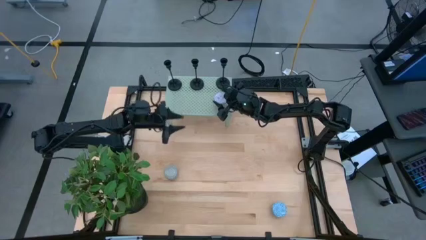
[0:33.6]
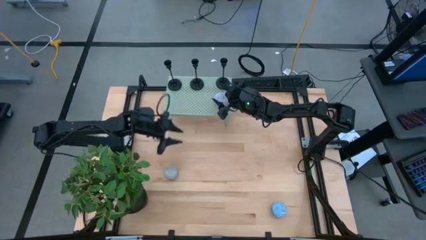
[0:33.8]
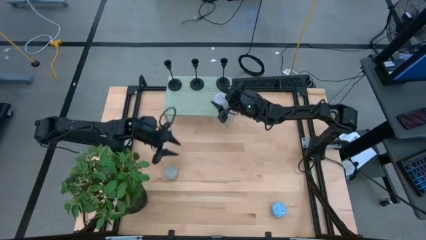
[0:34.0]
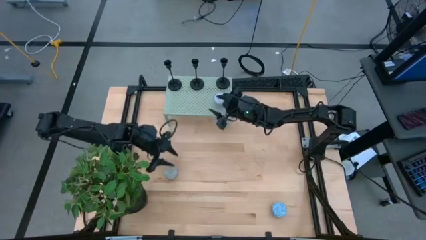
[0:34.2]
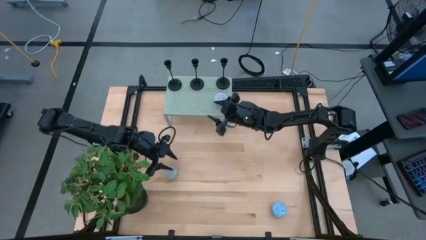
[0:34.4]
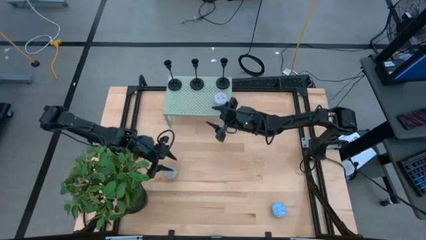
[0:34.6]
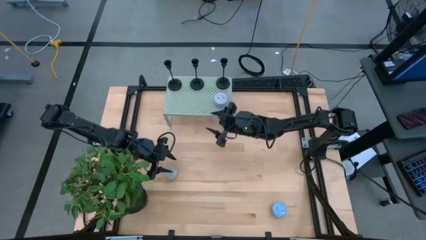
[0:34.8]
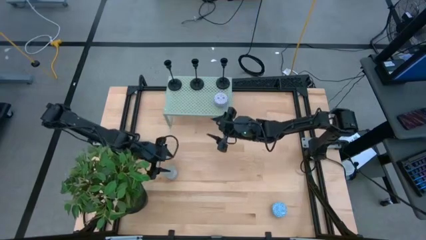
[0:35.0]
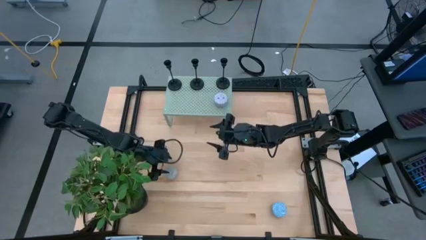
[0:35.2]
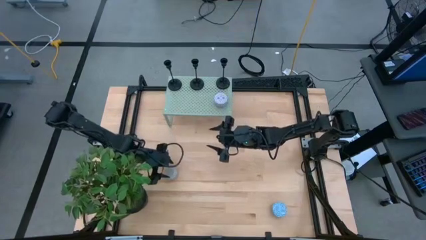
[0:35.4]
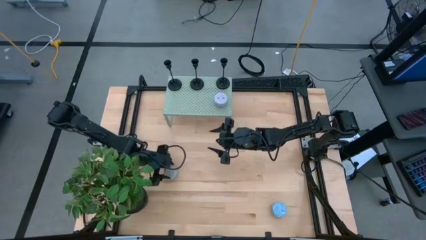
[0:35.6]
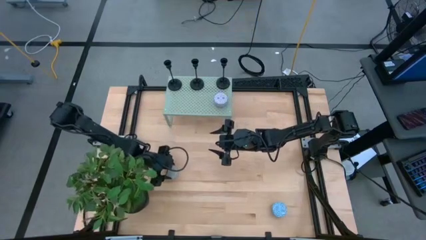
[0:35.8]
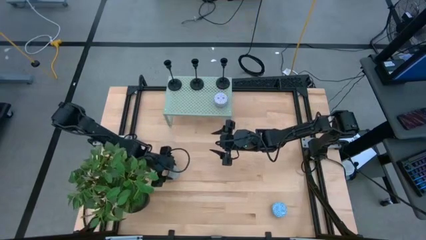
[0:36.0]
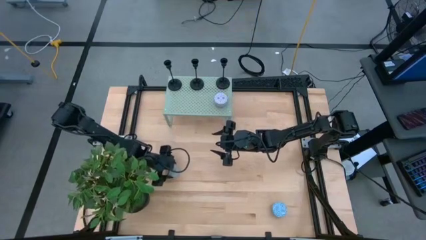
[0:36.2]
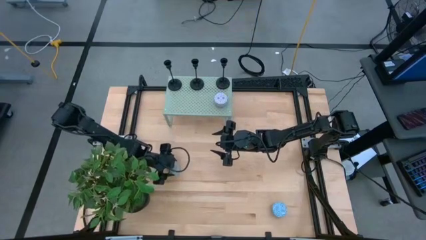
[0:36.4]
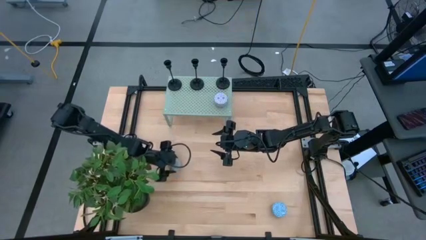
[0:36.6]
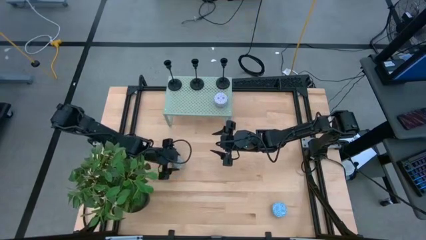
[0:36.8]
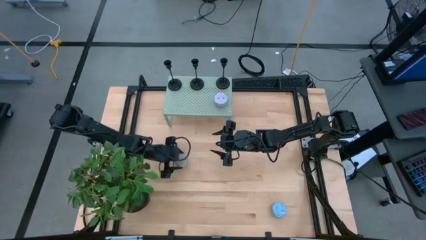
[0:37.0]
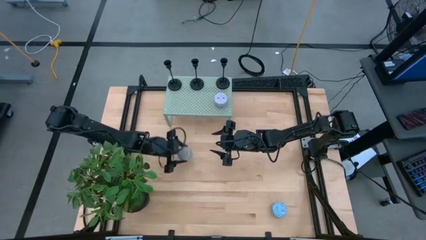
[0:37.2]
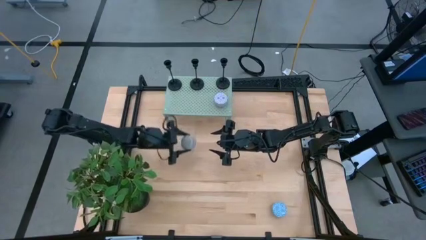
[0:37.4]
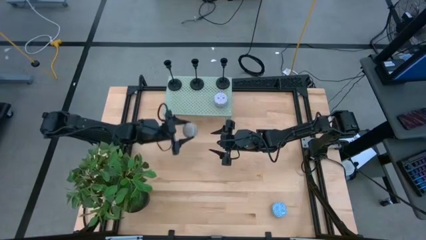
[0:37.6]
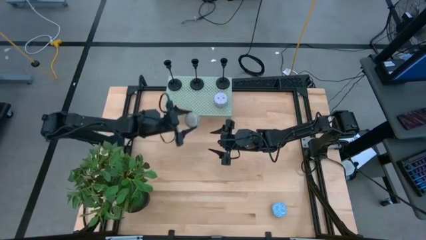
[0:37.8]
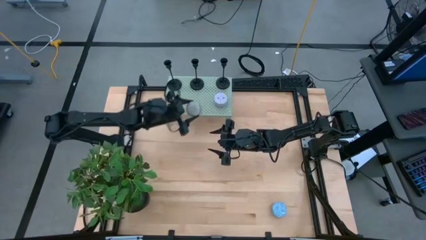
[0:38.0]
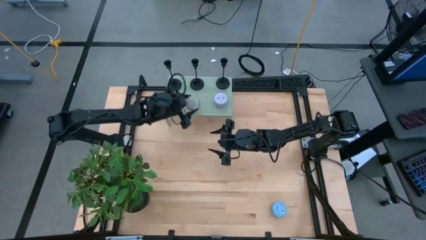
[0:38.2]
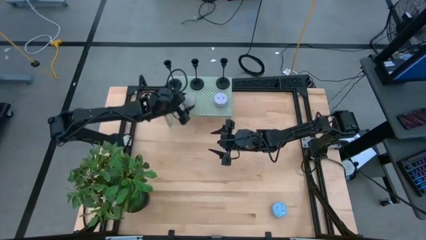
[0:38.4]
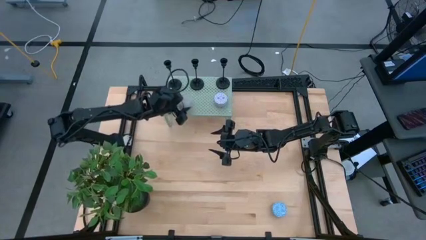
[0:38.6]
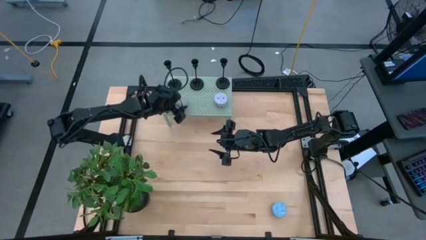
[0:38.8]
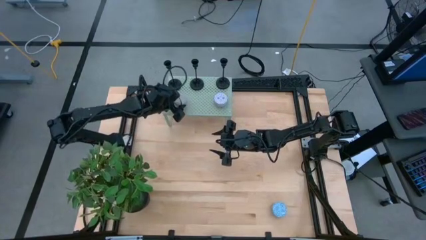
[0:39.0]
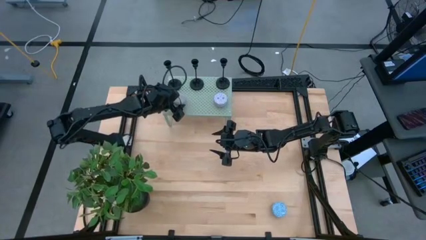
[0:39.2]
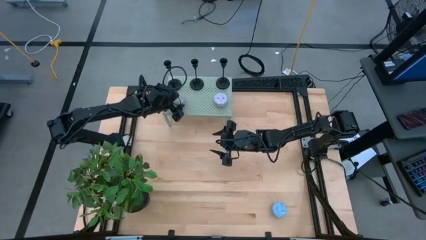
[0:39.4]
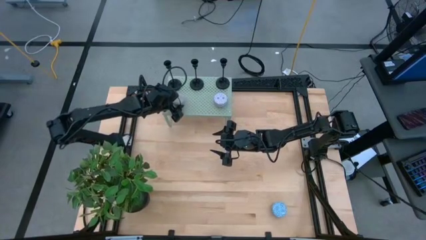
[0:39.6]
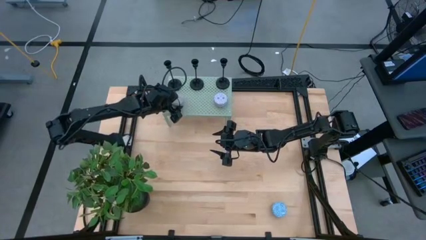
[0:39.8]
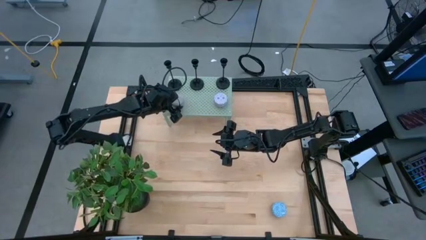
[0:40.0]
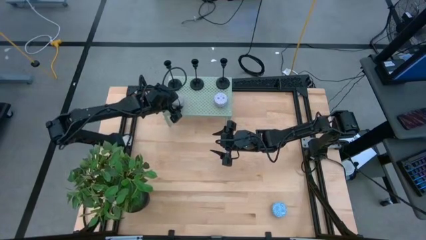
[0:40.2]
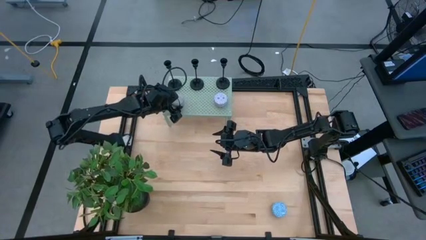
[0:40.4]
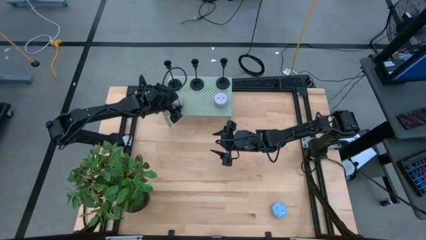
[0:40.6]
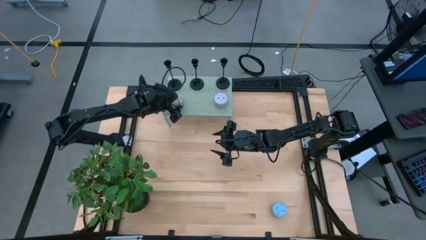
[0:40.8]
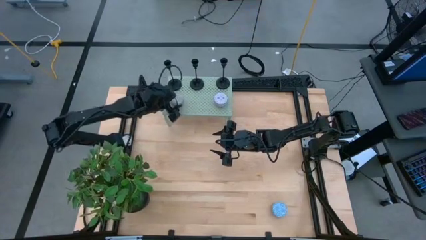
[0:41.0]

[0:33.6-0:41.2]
Task: Pick & Place candle stick holders
Put the left blue and yellow scented decorative candle on the shelf

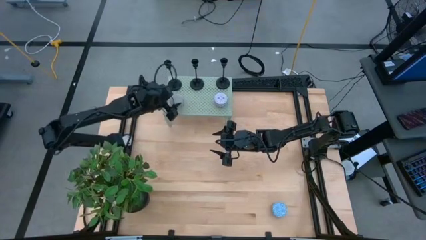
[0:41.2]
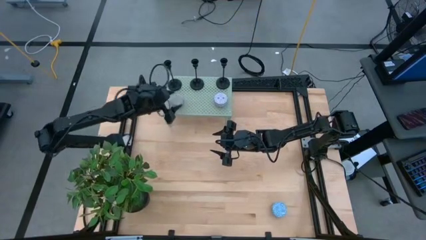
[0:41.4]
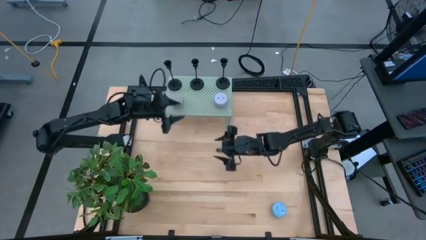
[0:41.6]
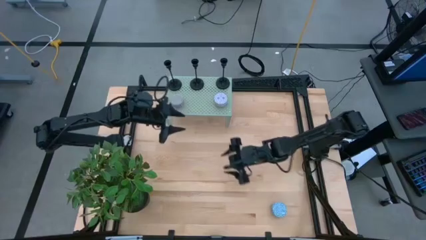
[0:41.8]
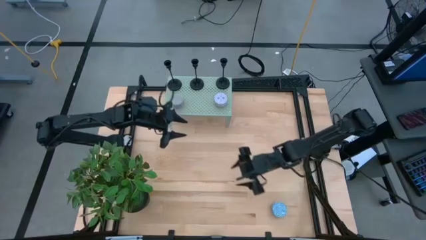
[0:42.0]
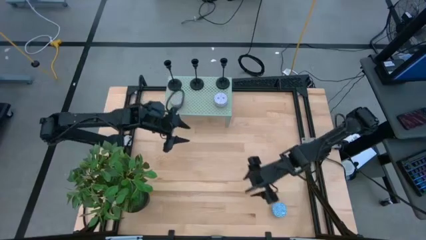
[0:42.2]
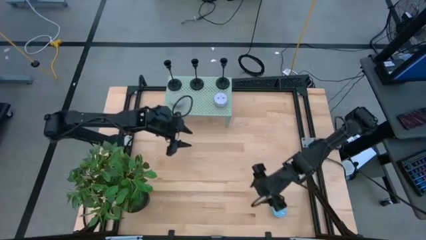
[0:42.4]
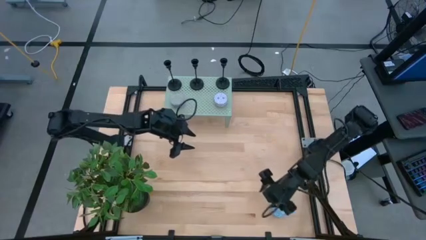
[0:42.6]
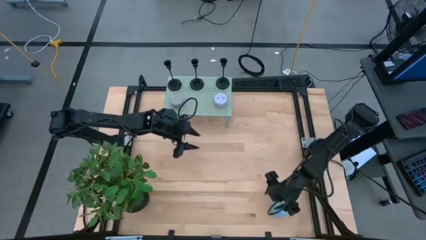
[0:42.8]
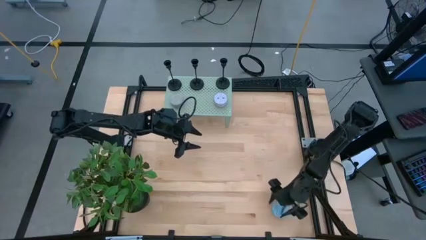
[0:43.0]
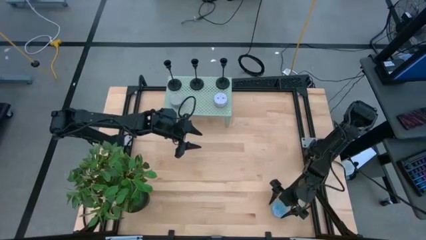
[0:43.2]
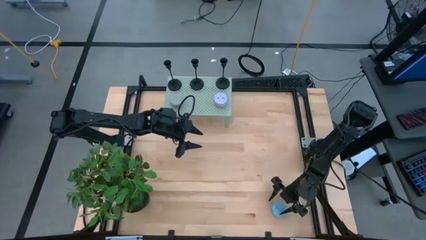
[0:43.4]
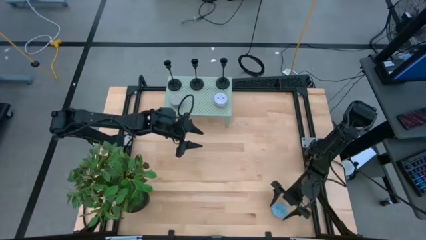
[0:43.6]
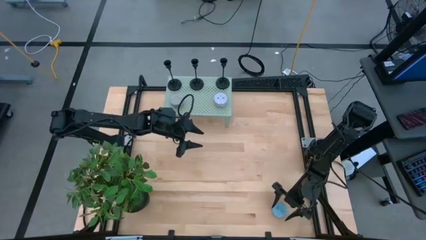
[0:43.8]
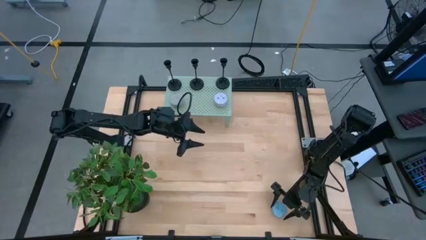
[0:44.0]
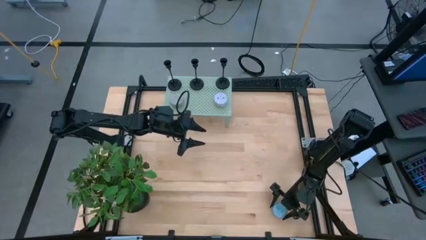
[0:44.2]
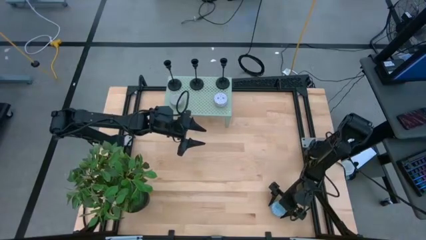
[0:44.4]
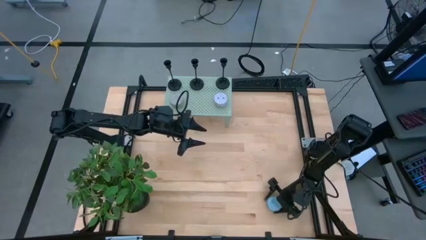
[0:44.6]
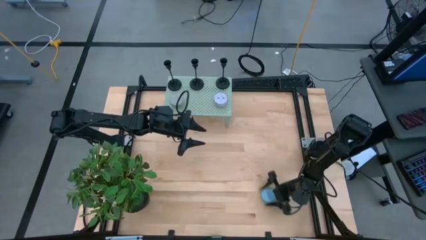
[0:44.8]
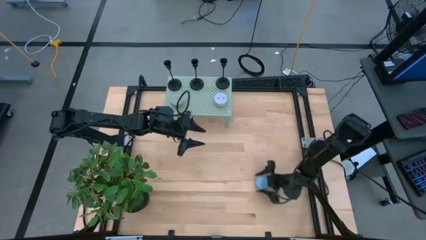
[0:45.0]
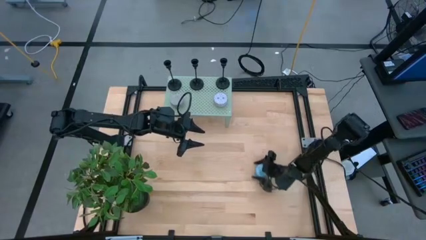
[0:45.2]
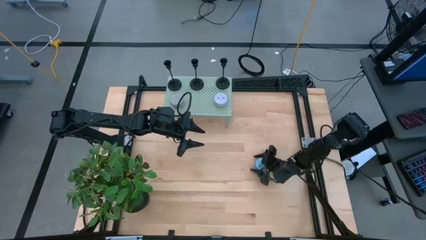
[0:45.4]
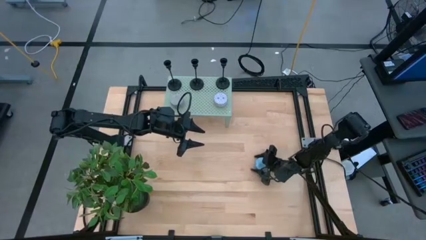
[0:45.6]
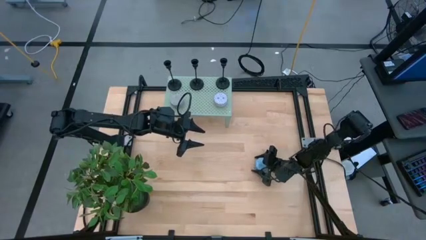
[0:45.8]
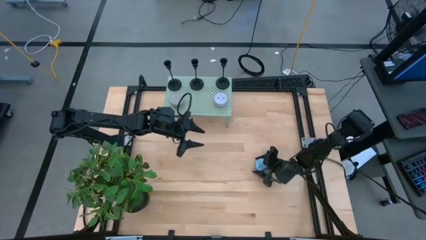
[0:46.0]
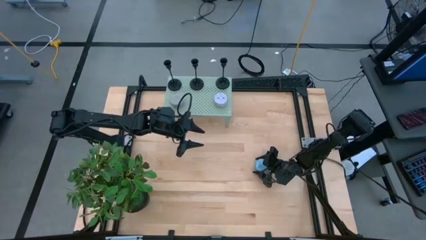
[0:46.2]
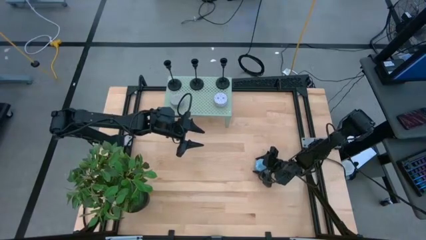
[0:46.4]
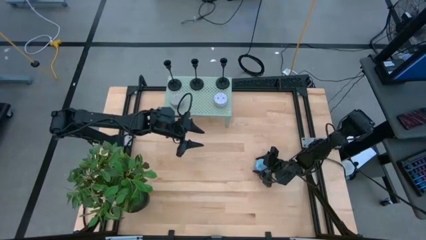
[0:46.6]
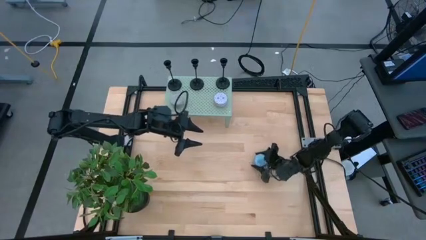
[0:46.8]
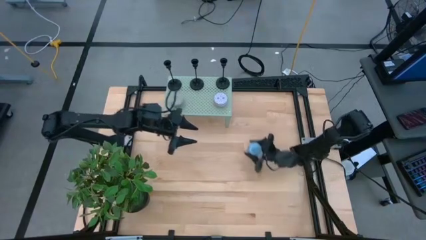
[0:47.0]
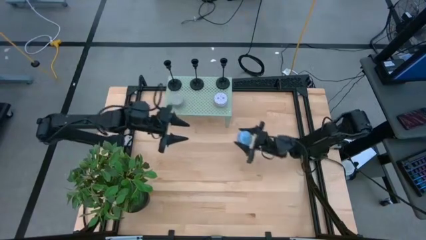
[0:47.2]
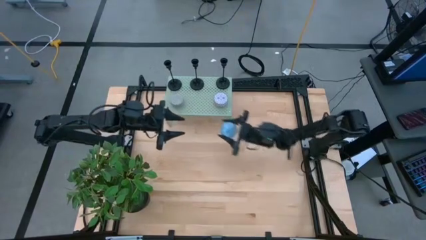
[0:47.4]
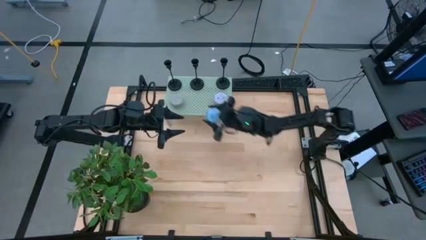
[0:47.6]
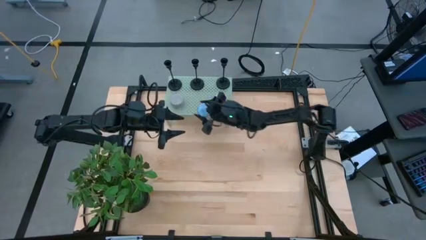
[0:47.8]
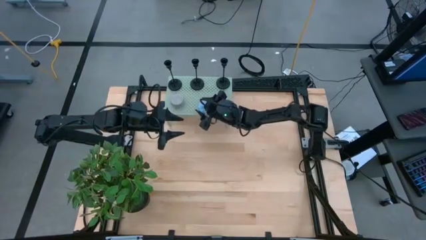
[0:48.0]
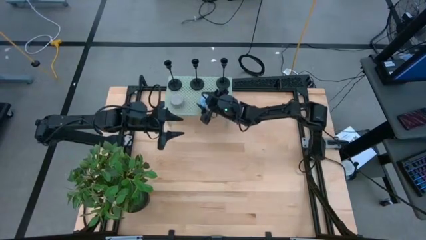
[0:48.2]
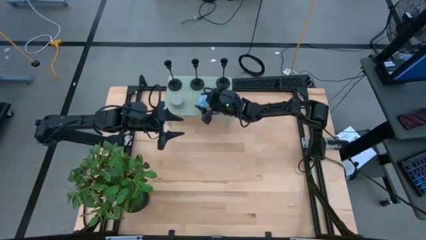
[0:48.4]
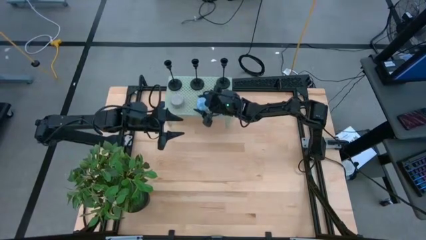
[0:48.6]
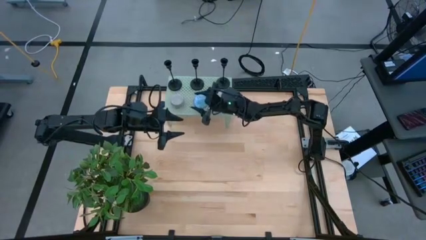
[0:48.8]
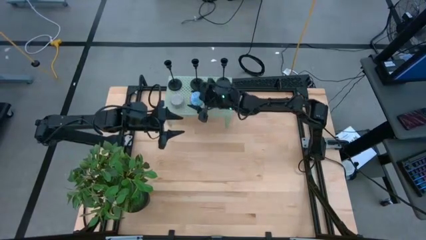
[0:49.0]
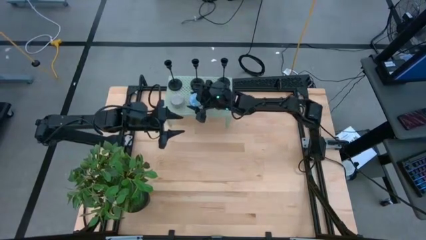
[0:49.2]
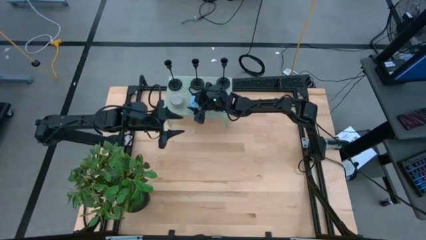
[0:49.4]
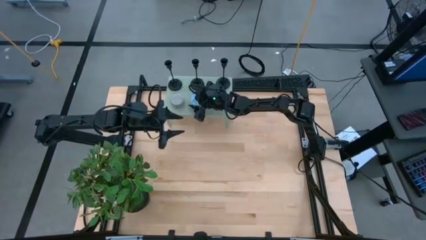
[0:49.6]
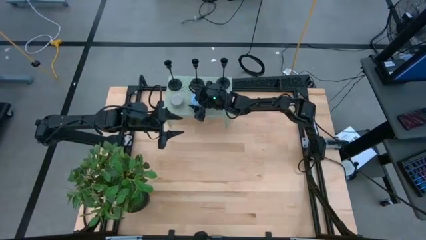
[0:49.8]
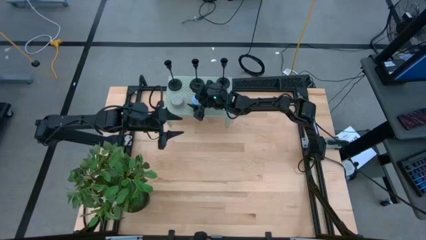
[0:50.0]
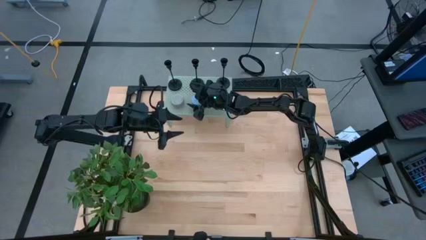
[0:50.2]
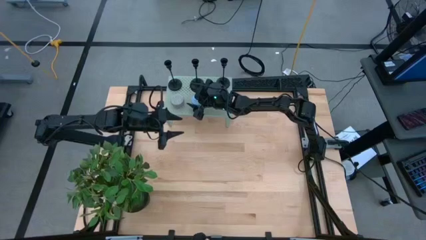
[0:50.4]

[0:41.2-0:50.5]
Put the light blue scented decorative candle on the shelf
